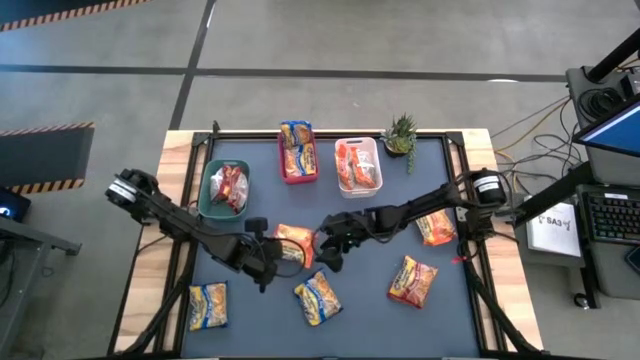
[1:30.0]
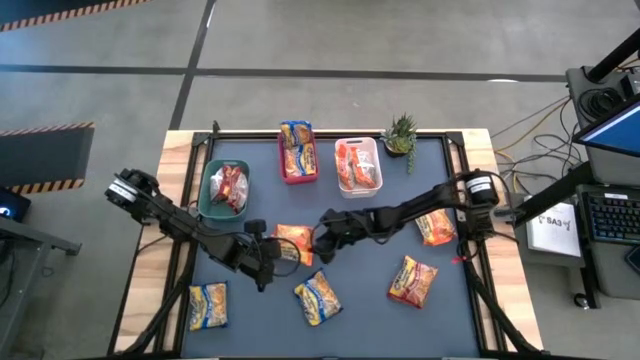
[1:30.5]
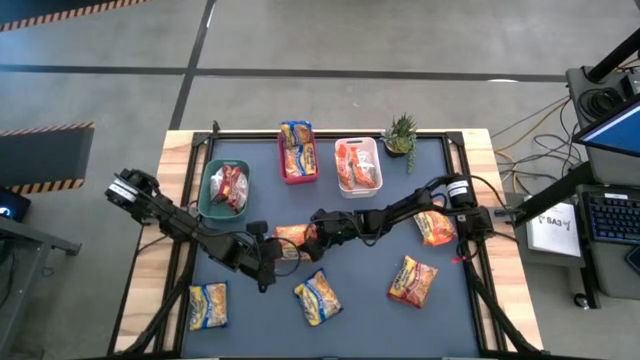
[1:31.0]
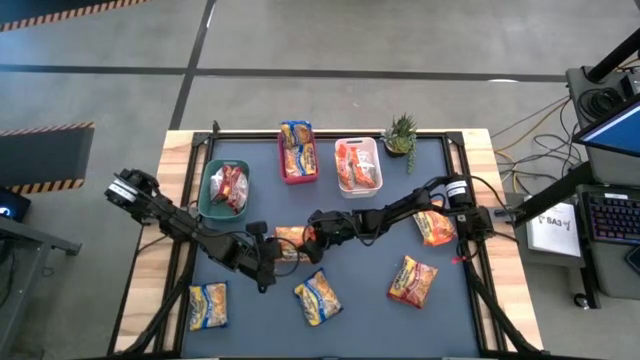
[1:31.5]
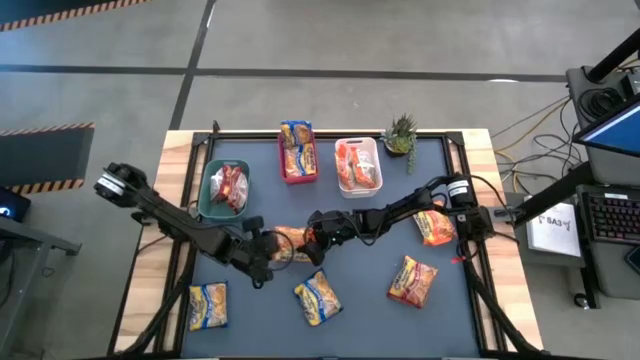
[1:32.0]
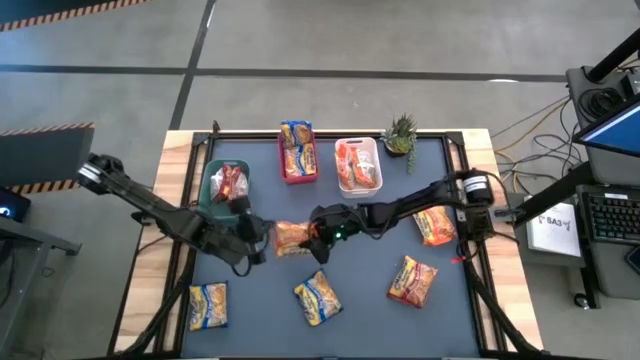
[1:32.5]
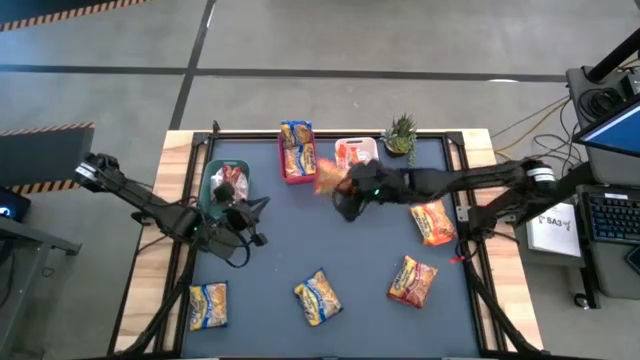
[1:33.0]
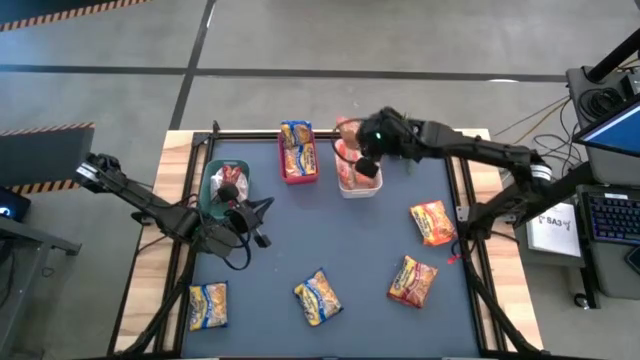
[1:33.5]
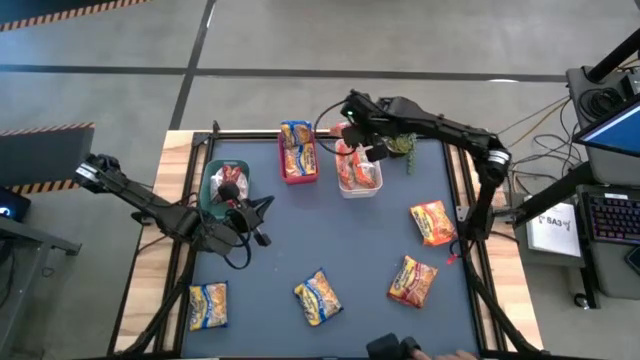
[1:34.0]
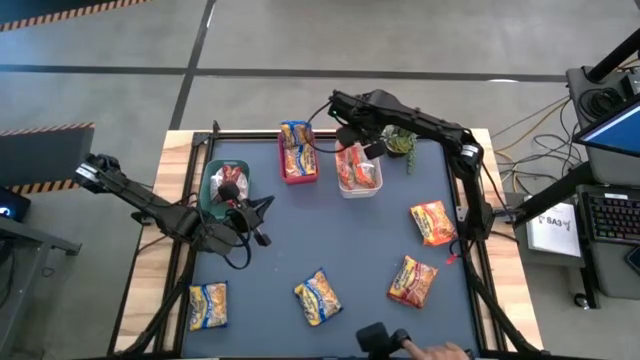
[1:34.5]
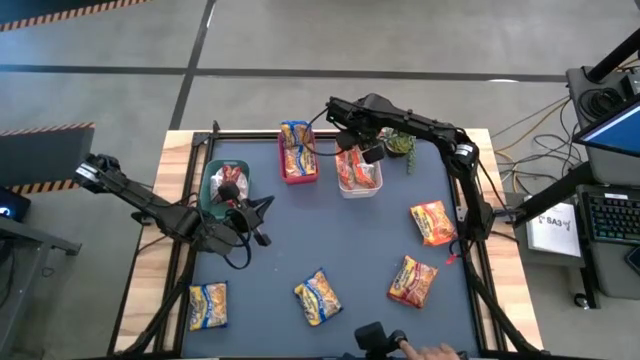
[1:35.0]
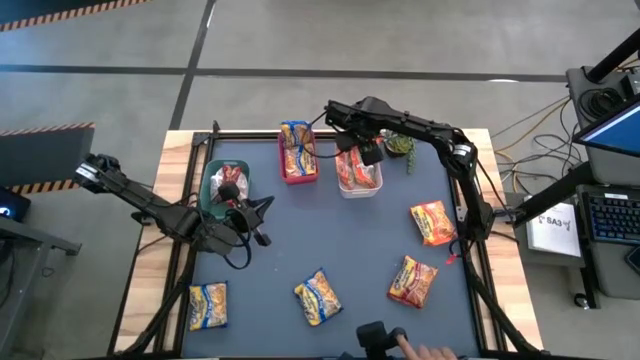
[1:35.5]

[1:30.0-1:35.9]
Task: Sort Maruchan noodles
Put the orange noodle pack into the white bin

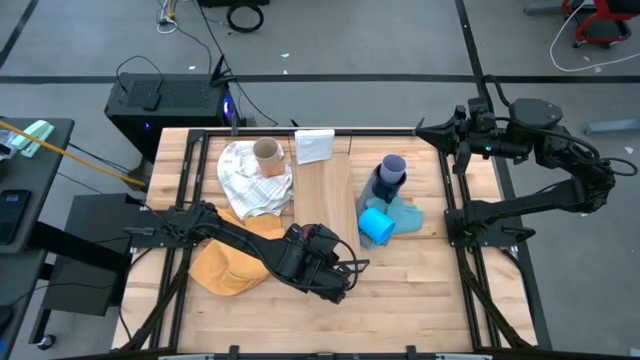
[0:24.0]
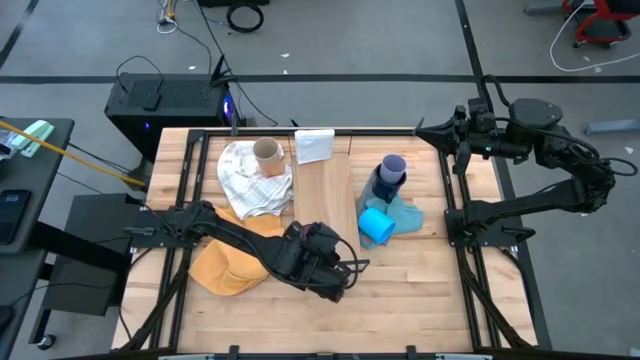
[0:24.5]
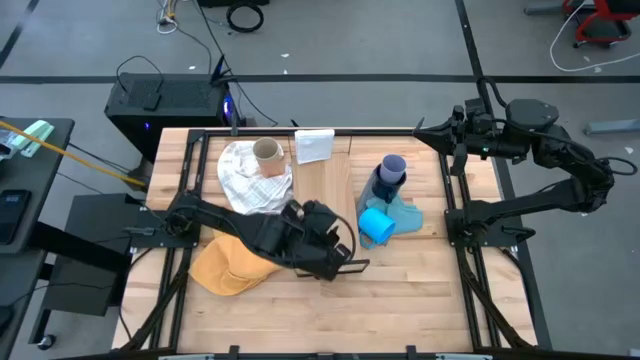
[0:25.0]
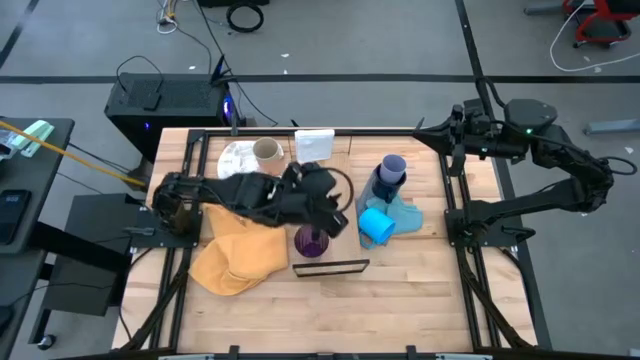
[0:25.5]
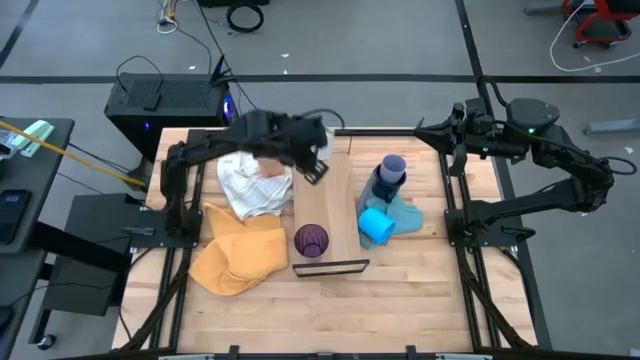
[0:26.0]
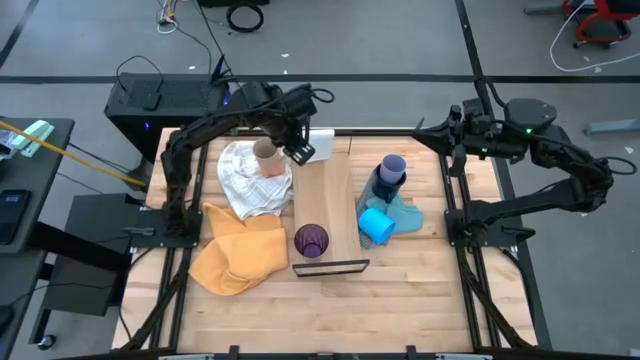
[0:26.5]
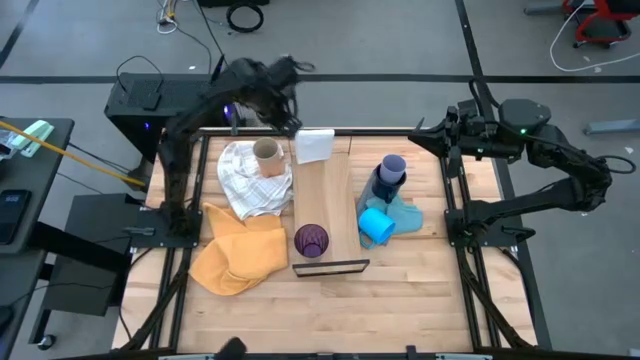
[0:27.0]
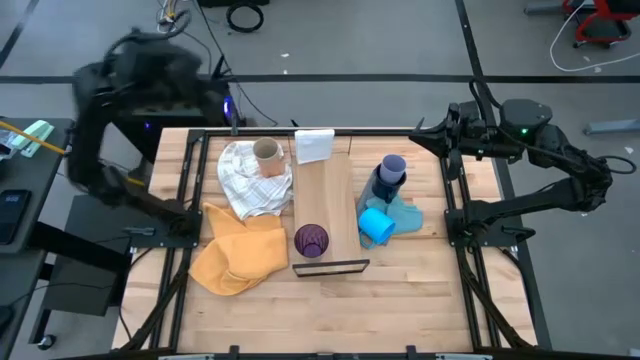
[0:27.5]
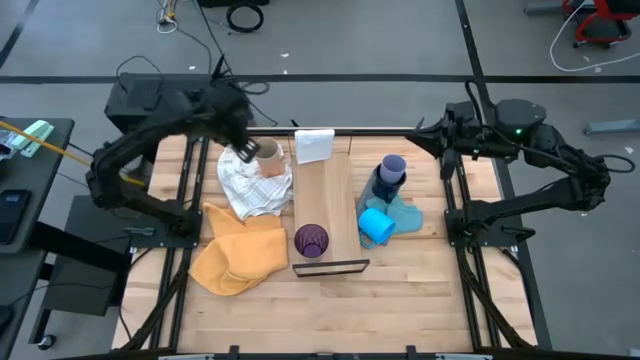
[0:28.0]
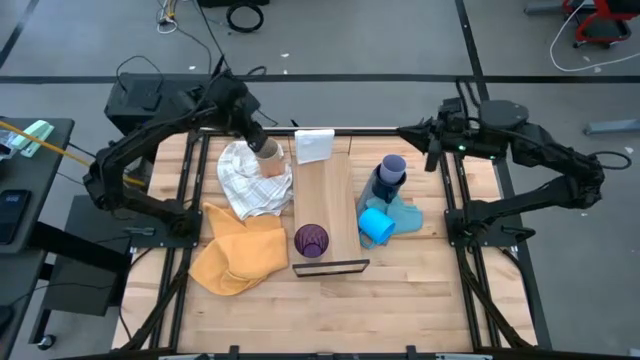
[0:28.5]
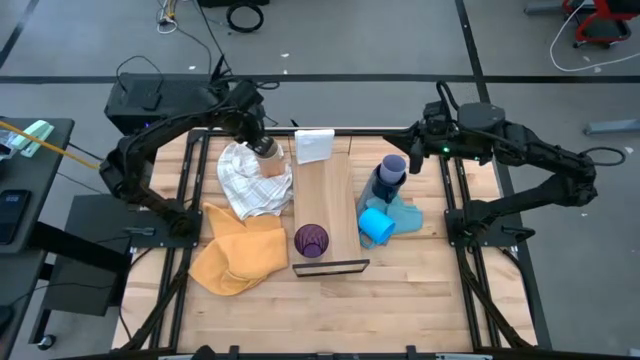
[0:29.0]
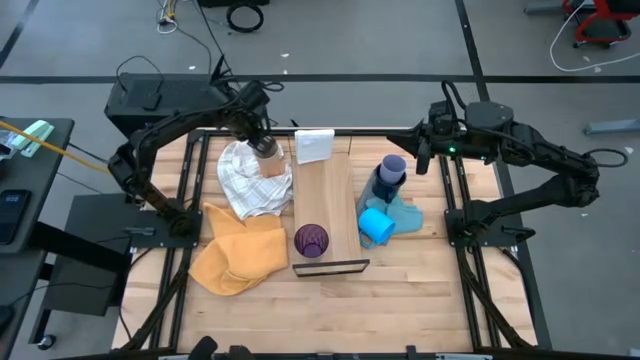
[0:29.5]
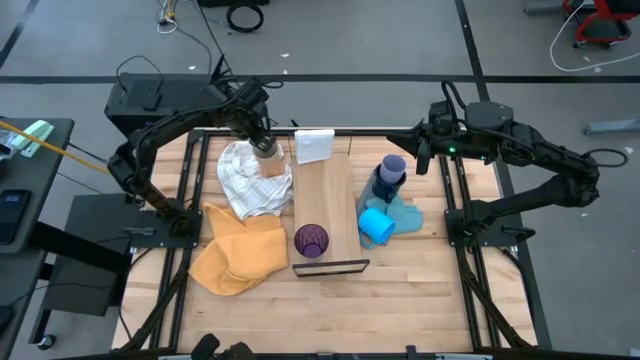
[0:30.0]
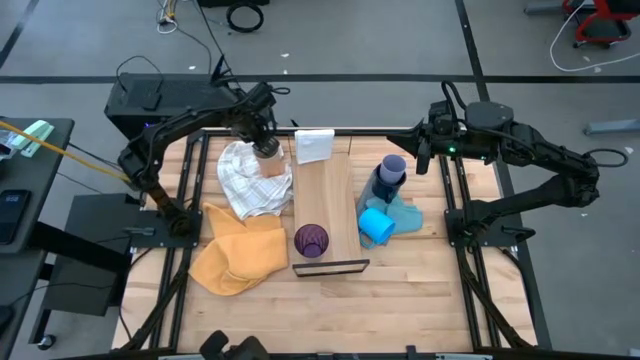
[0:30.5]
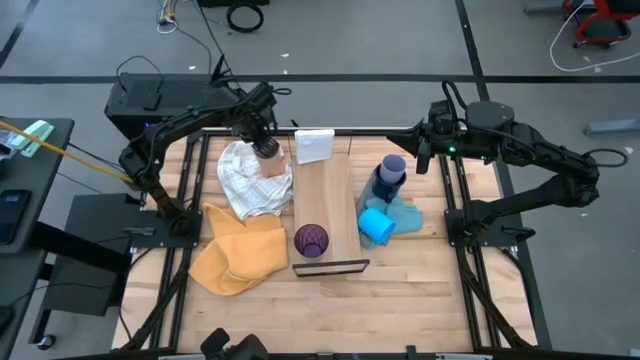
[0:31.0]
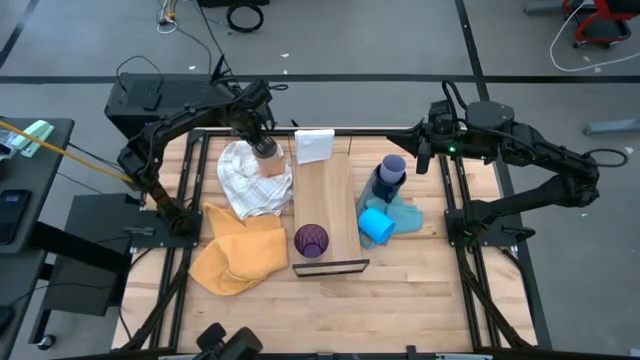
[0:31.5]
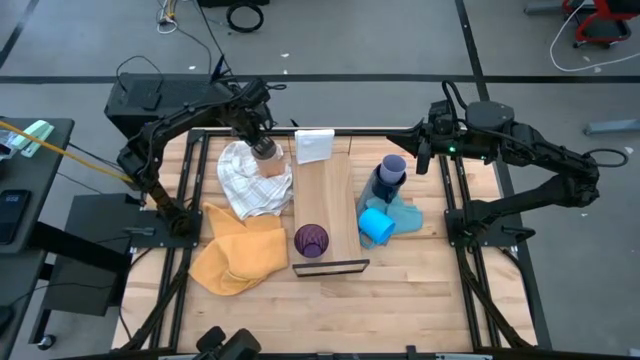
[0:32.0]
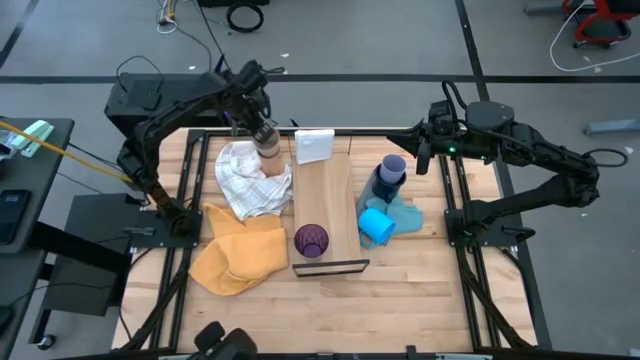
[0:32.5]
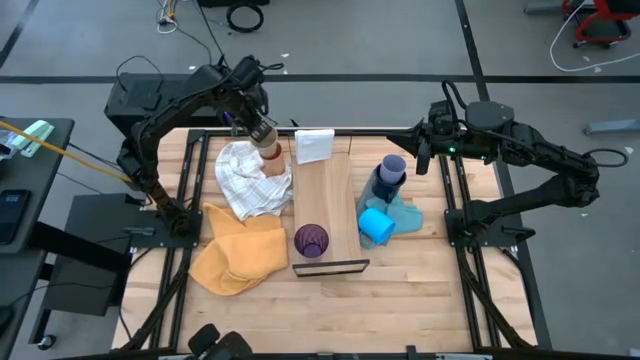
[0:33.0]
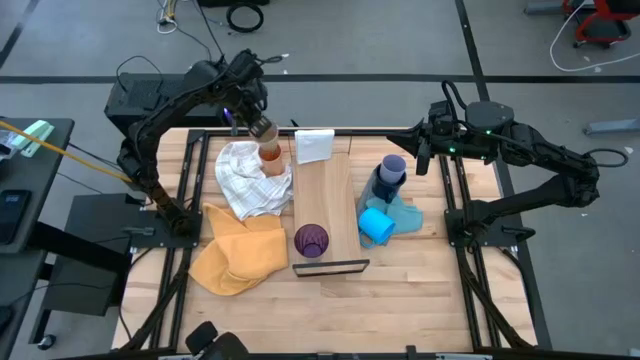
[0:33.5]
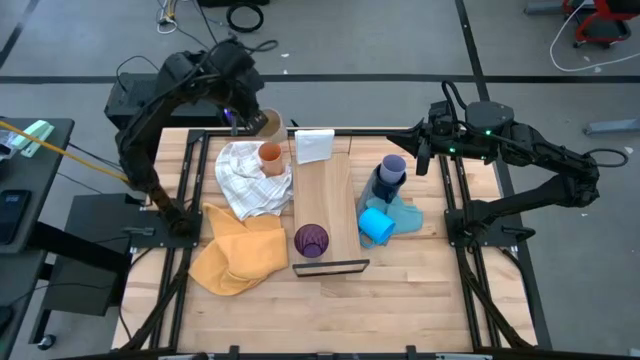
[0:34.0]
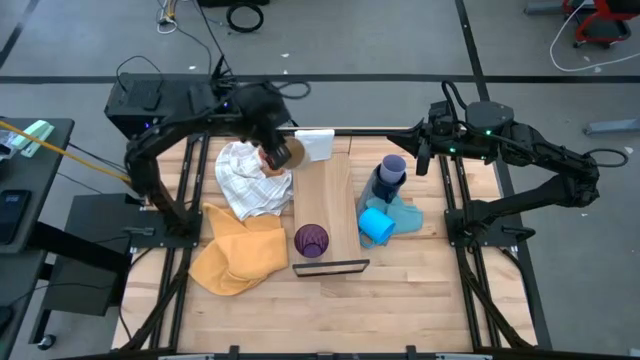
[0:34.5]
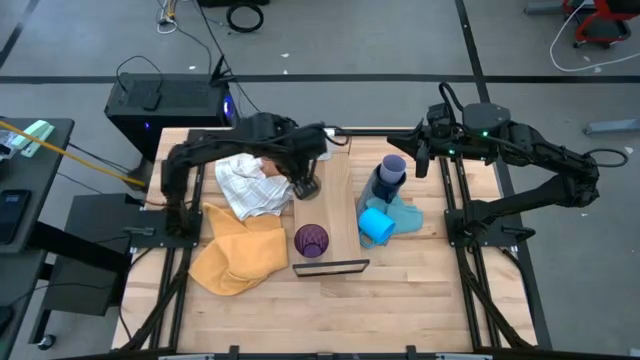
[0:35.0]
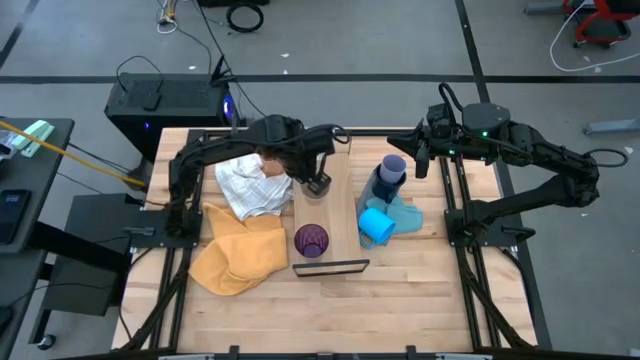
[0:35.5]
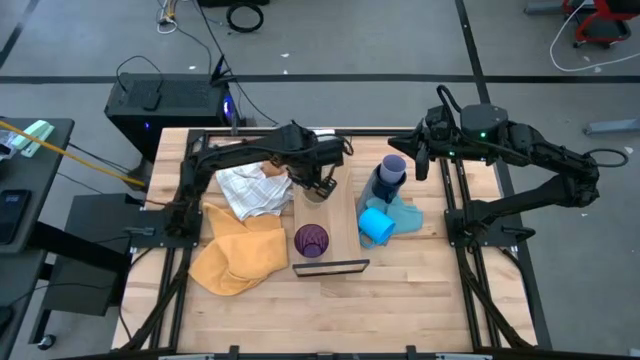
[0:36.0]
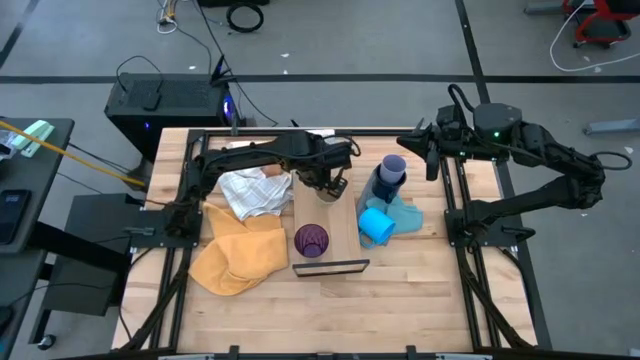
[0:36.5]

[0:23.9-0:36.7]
Task: Stack small to large cups/mugs on shelf
Put the brown cup on the shelf
